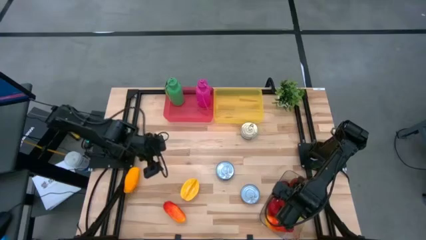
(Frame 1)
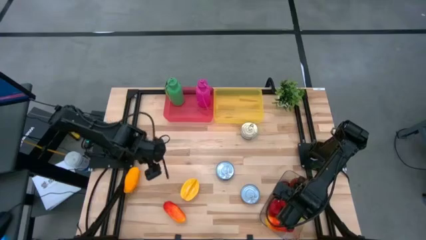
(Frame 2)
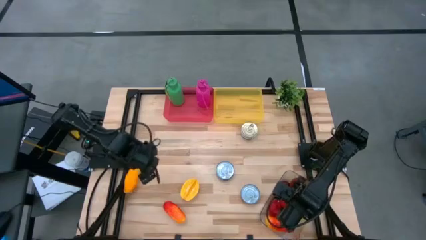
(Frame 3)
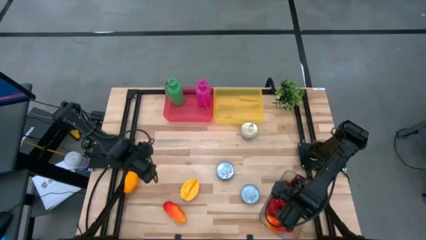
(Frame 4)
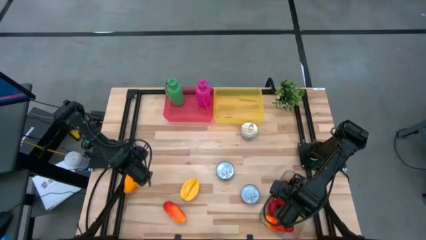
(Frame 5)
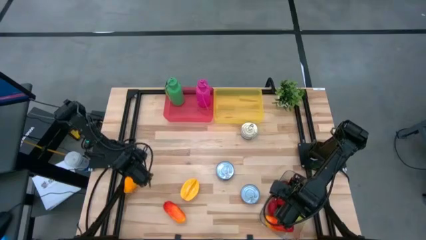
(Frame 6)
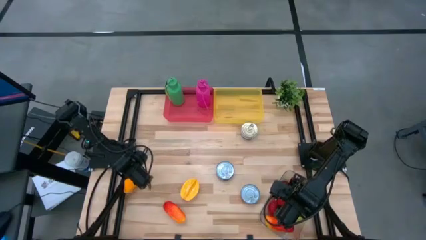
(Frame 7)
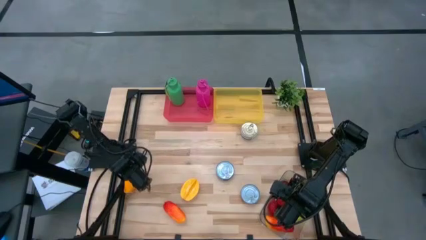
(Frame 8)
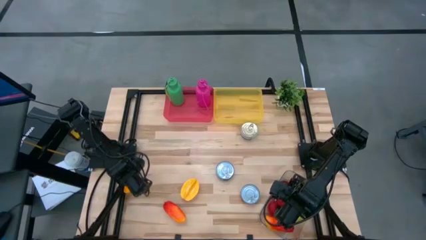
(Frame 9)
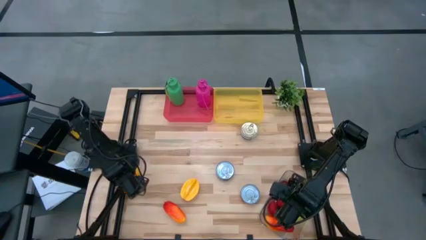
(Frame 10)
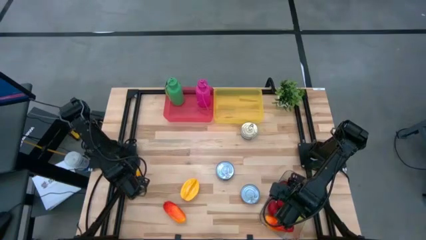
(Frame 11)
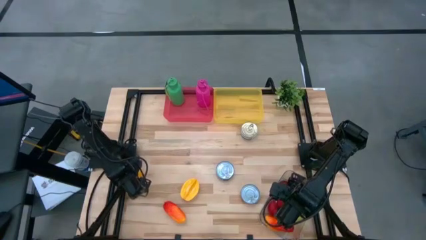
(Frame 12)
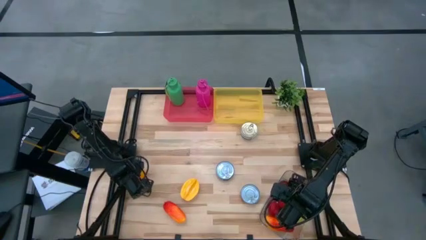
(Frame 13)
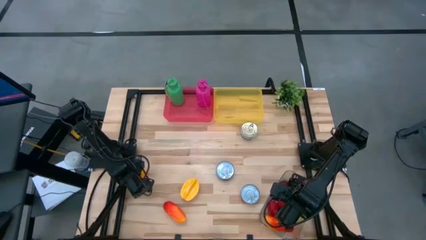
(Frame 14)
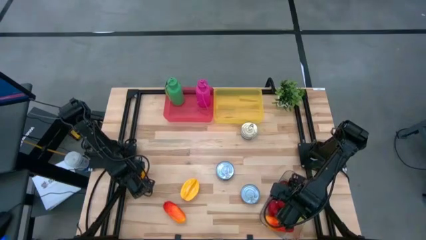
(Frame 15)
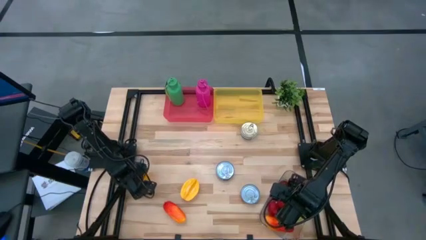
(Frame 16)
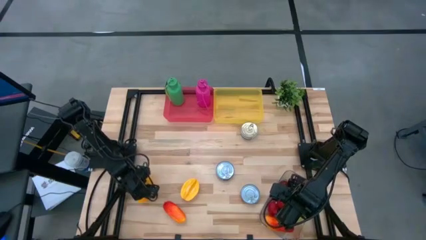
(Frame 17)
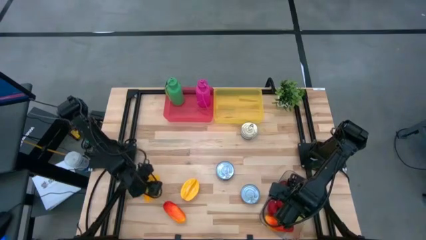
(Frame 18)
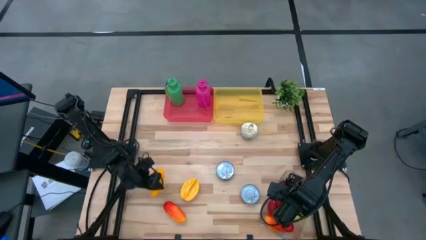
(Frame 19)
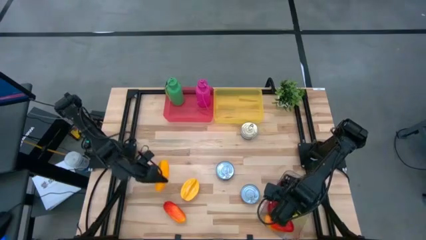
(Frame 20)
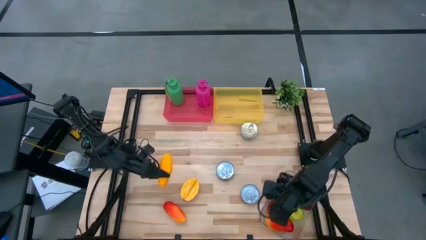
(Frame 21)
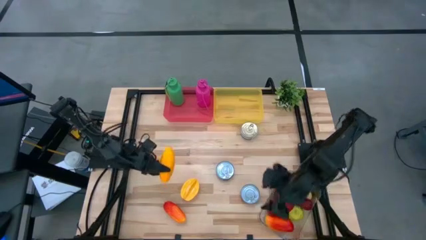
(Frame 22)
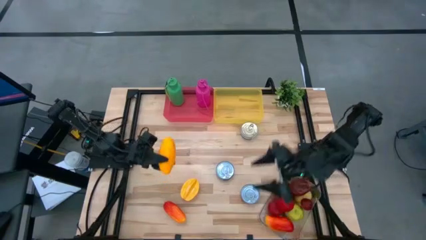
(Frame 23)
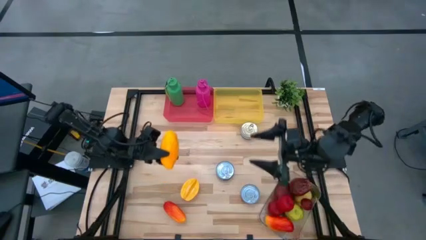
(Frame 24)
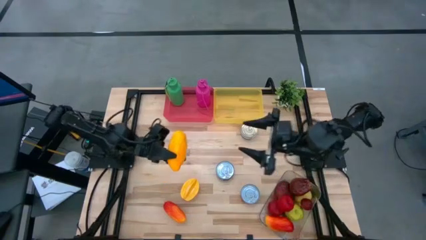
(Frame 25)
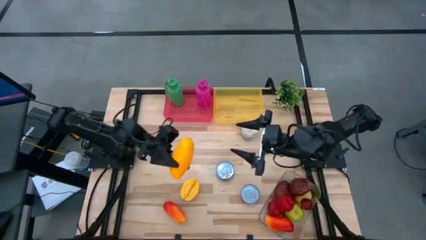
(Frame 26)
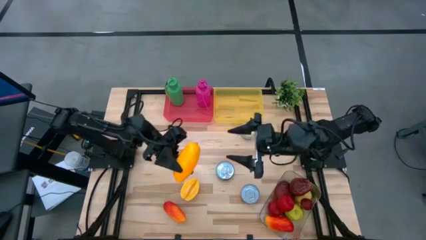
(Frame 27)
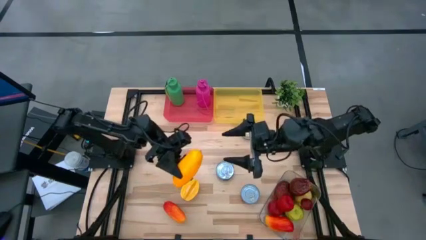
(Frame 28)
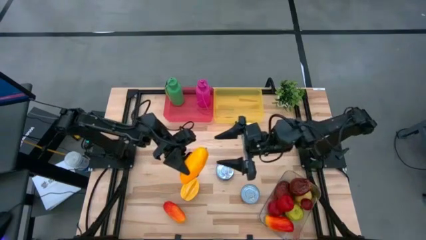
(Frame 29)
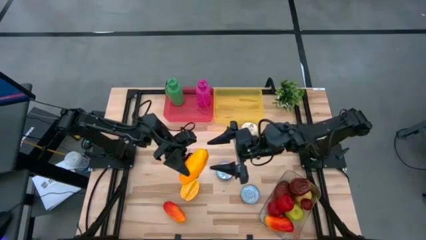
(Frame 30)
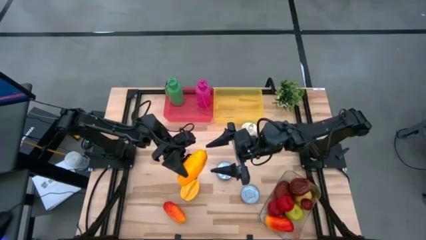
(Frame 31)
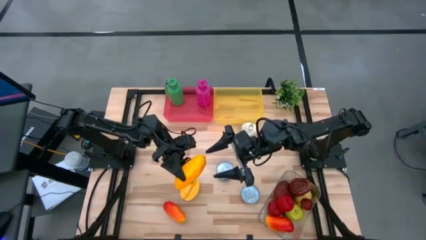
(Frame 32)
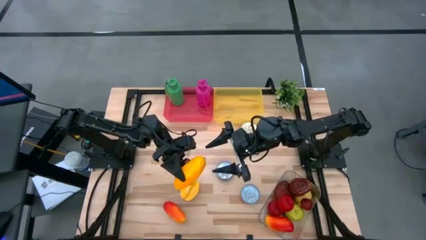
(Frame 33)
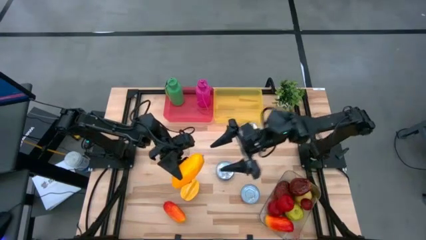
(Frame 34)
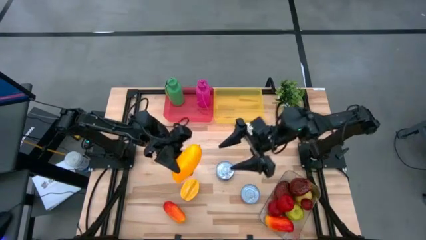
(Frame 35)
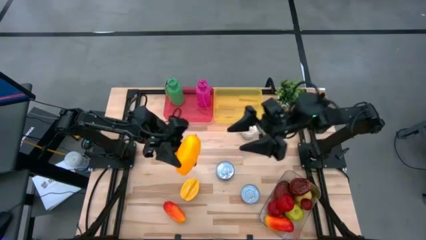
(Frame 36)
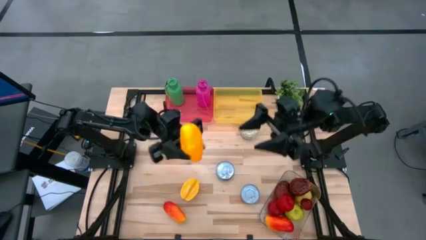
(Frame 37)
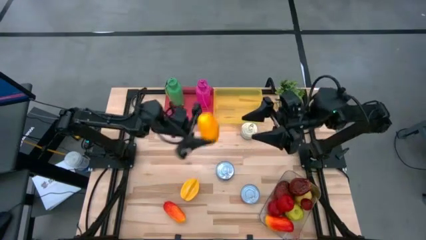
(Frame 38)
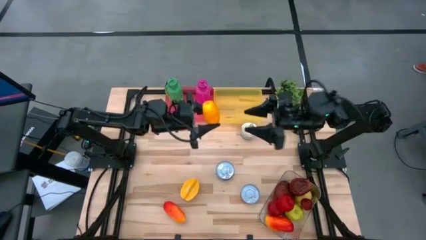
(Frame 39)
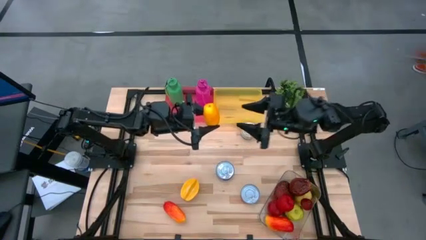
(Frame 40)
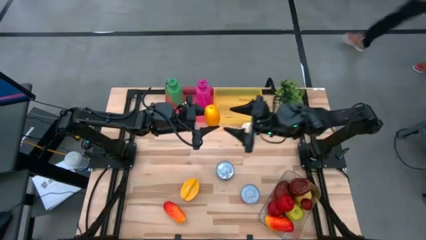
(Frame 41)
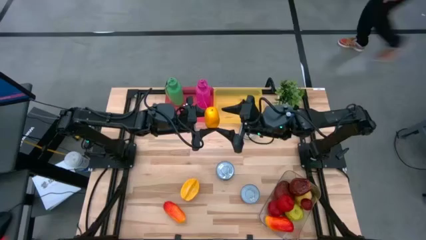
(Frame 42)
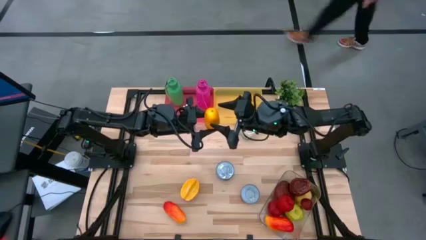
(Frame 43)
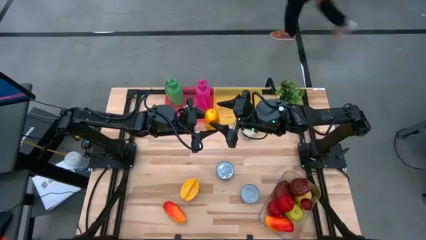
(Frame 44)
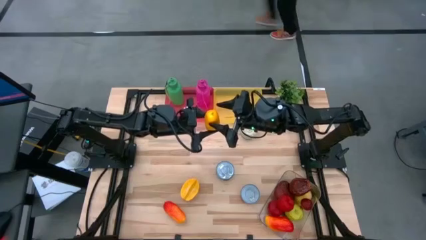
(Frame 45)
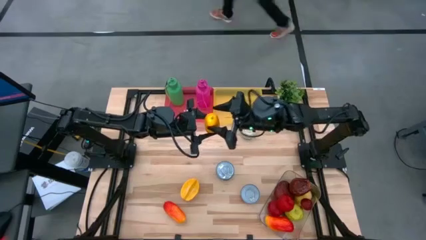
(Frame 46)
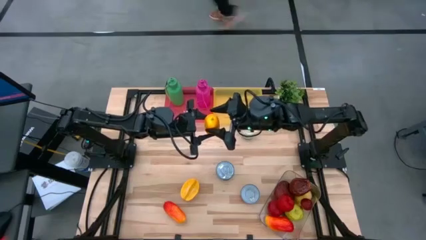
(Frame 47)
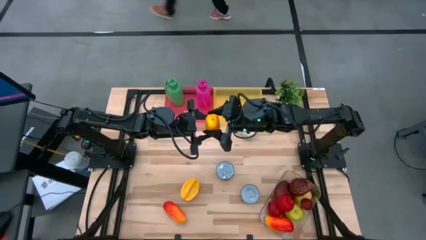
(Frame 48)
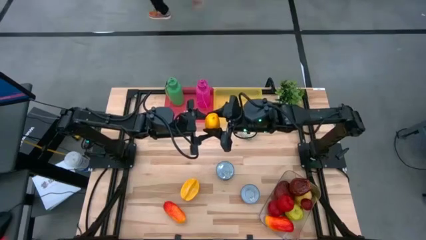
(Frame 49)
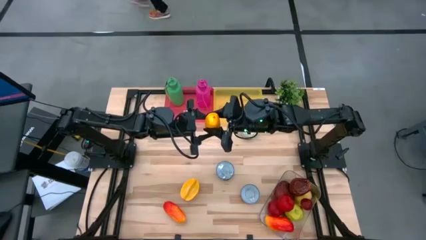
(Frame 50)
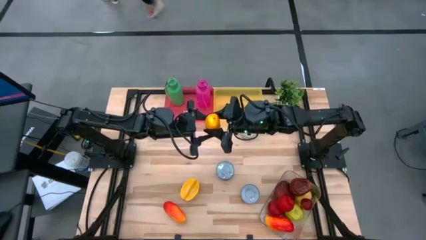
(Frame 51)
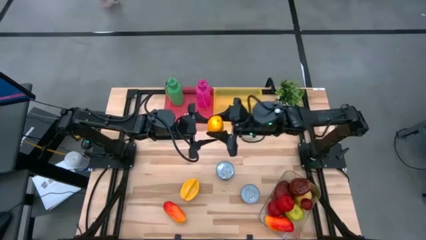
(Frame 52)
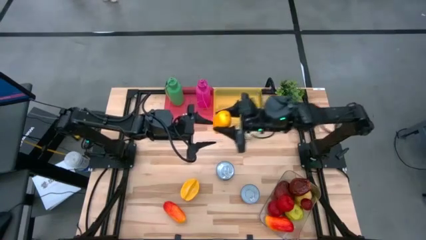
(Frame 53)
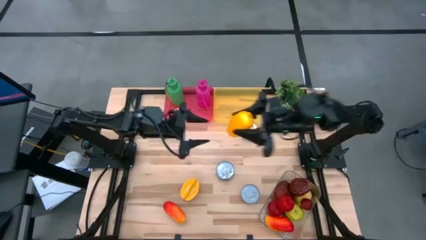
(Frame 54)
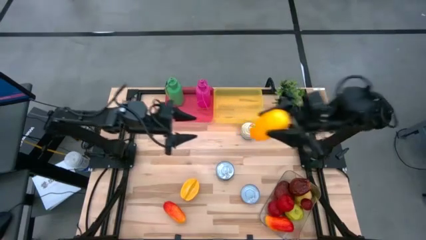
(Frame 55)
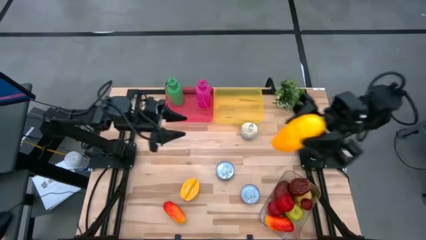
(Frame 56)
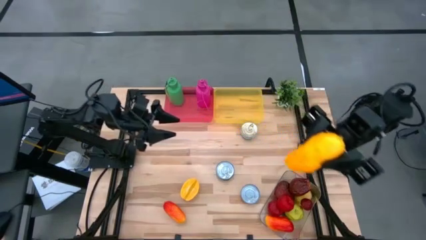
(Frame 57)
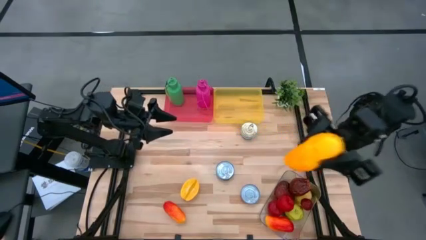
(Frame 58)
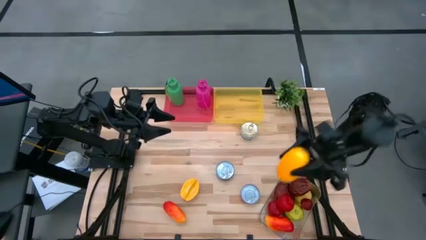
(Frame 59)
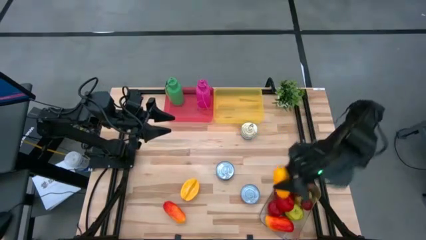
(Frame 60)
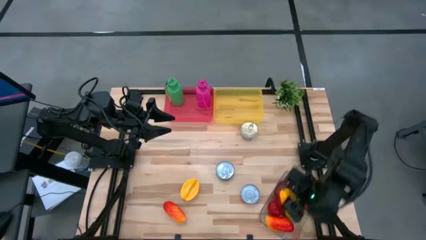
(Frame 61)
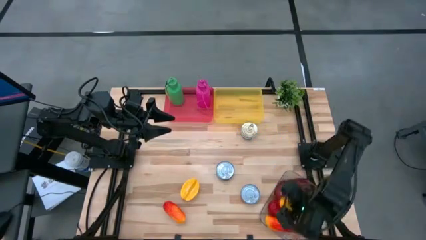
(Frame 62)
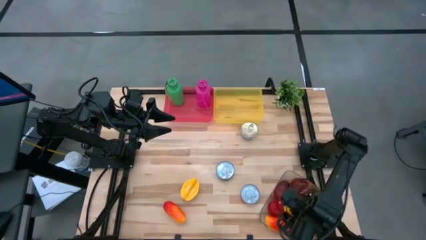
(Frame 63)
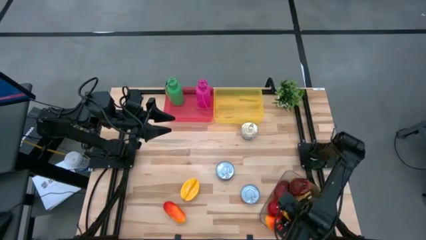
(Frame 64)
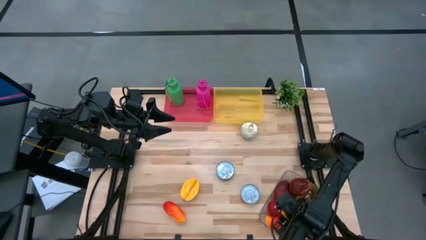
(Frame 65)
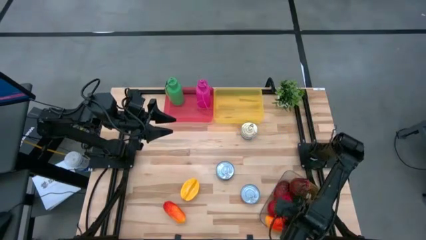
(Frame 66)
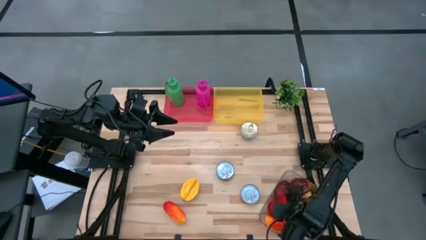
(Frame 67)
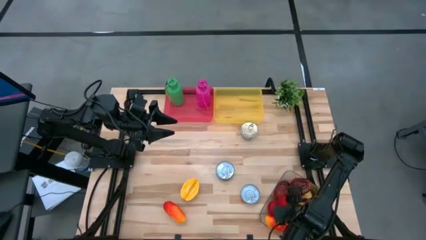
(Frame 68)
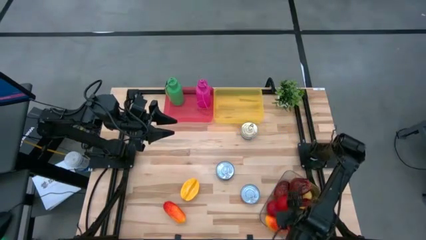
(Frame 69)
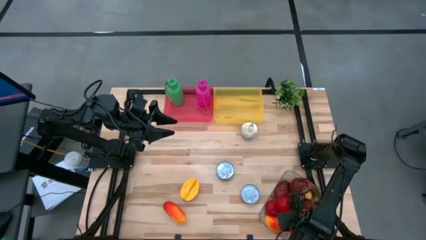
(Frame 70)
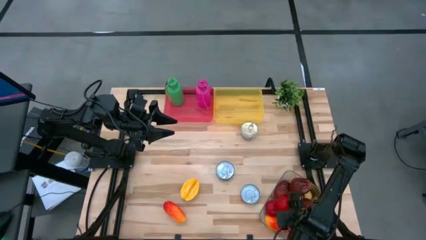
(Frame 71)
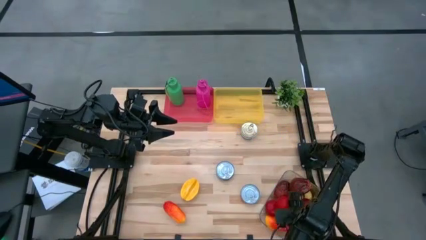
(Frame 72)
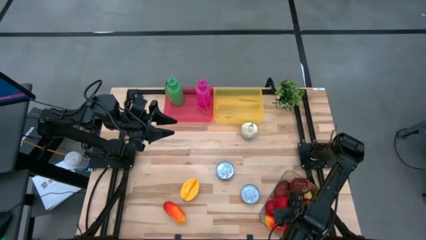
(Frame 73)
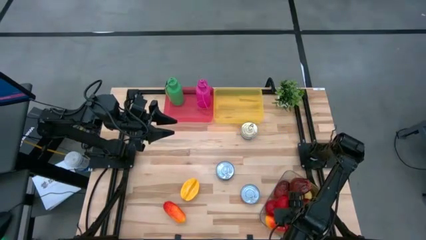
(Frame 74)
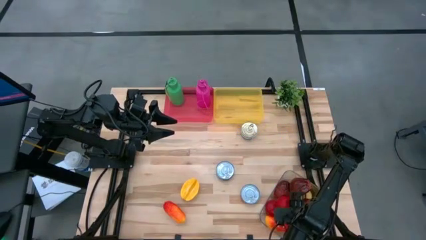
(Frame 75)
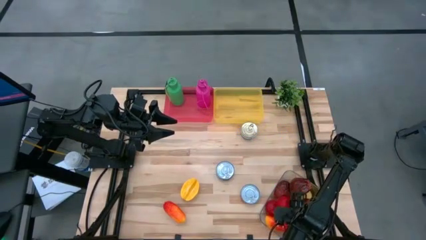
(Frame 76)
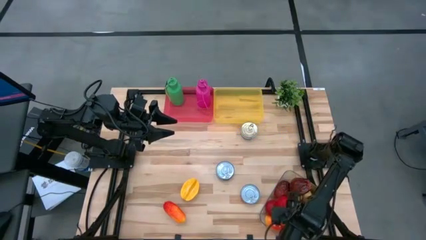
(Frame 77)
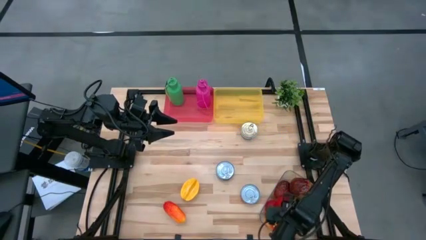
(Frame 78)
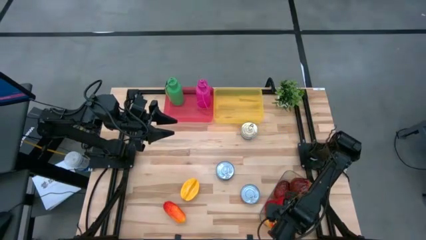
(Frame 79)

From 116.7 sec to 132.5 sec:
Task: Pick & Place Food Item
Put the left mango into the transparent bin
